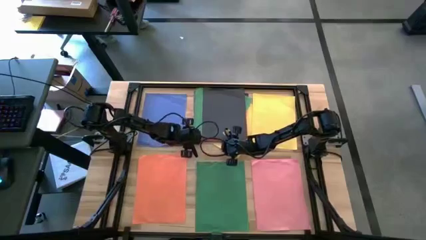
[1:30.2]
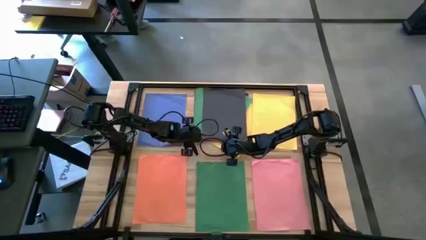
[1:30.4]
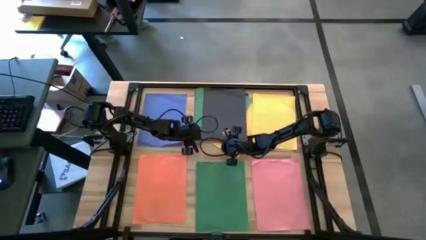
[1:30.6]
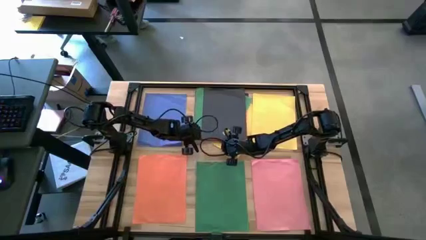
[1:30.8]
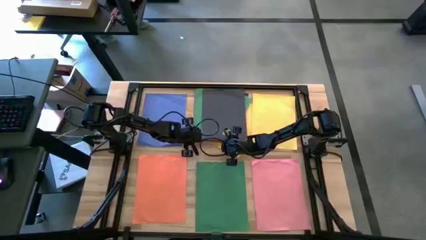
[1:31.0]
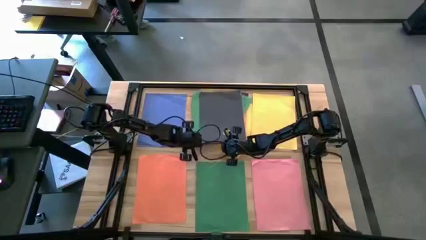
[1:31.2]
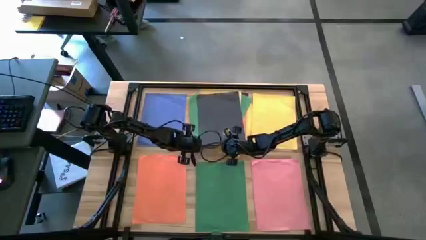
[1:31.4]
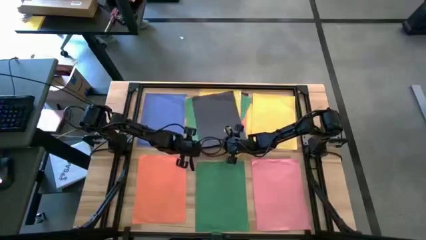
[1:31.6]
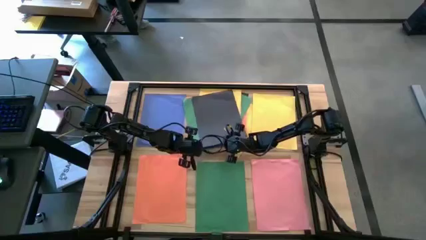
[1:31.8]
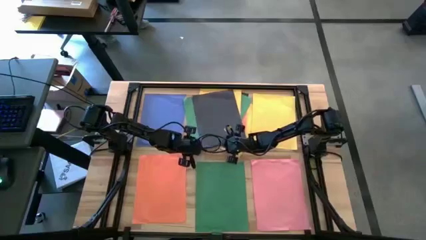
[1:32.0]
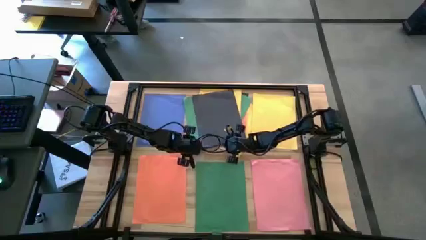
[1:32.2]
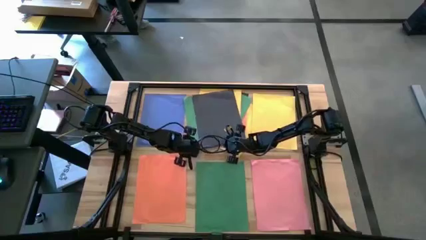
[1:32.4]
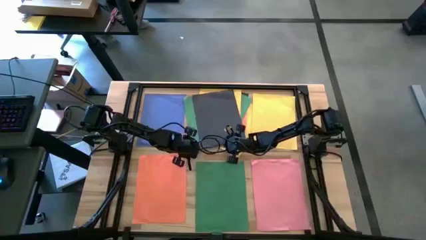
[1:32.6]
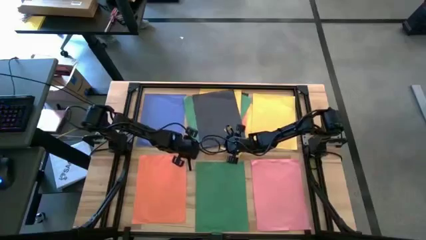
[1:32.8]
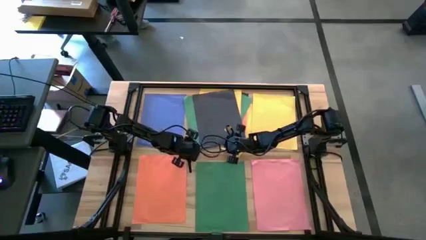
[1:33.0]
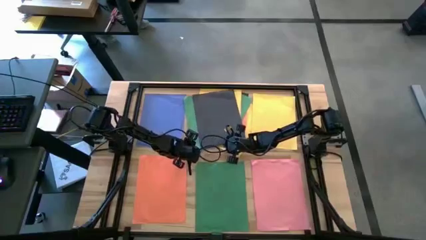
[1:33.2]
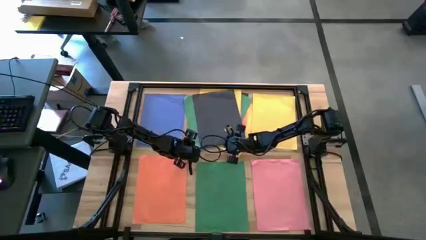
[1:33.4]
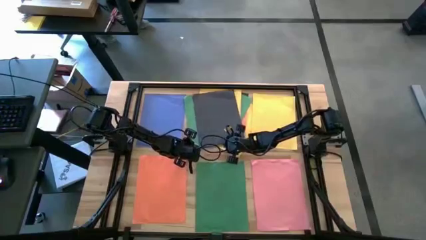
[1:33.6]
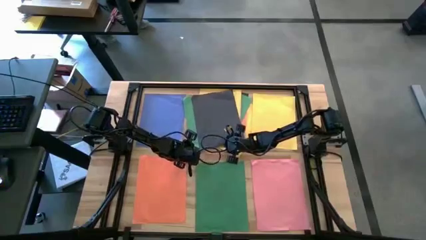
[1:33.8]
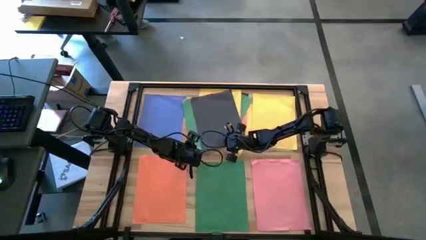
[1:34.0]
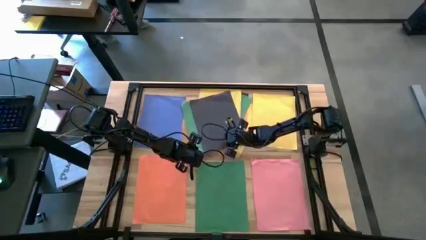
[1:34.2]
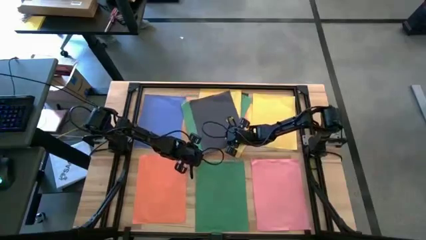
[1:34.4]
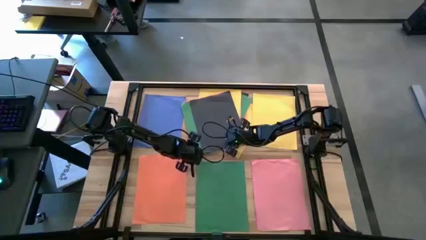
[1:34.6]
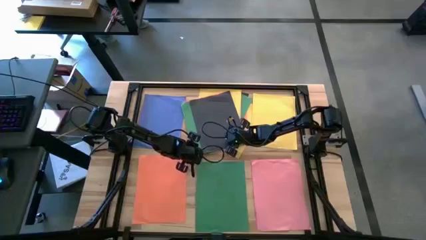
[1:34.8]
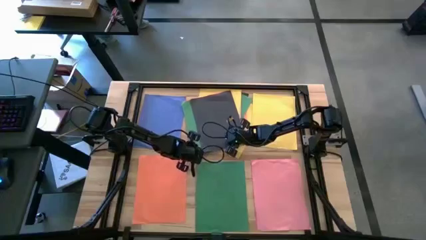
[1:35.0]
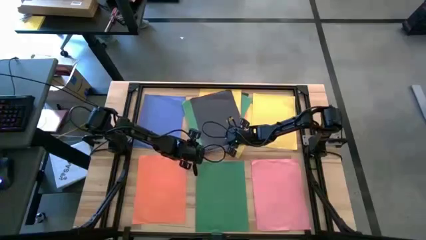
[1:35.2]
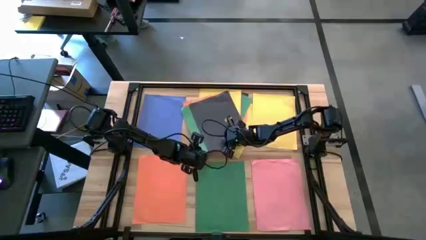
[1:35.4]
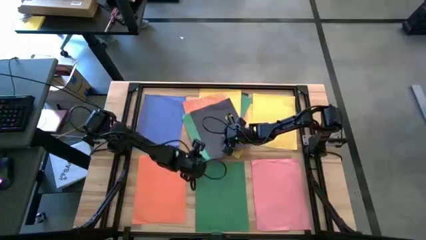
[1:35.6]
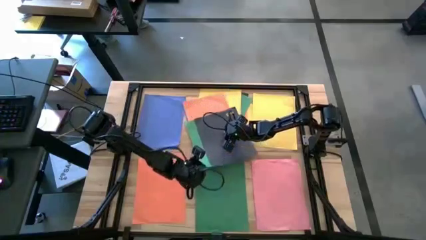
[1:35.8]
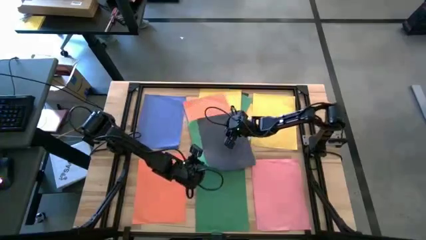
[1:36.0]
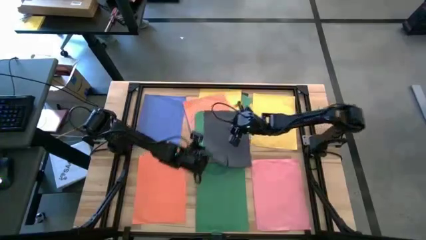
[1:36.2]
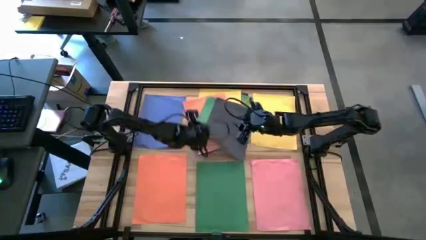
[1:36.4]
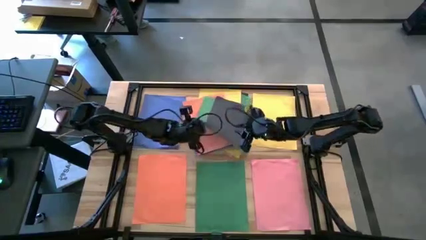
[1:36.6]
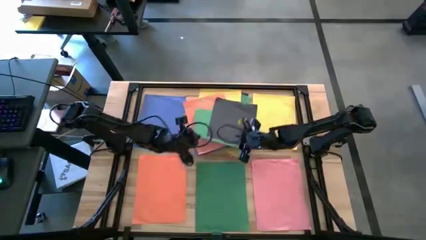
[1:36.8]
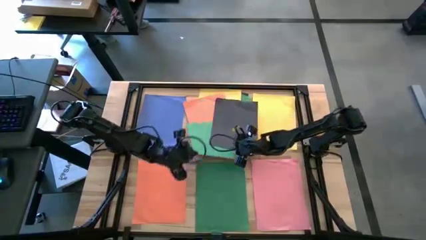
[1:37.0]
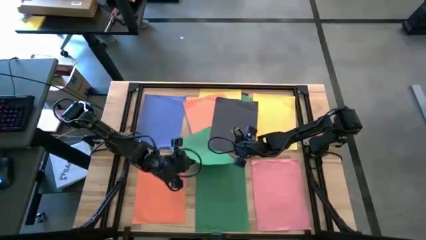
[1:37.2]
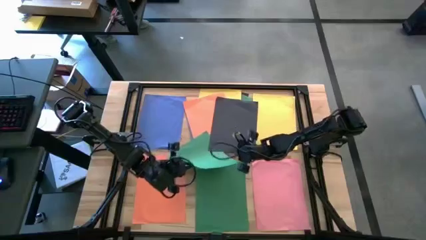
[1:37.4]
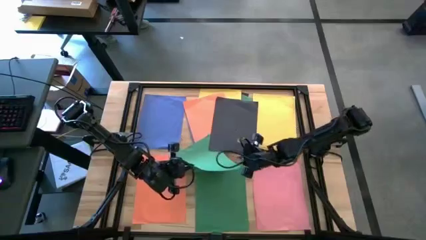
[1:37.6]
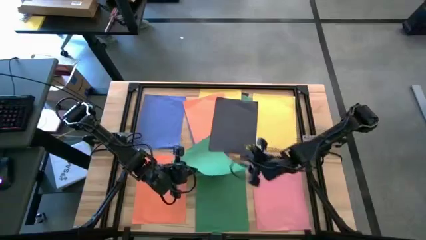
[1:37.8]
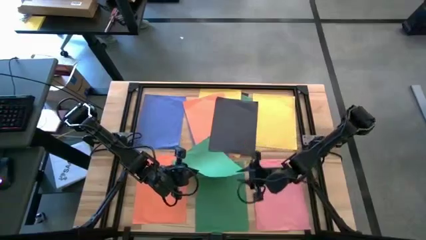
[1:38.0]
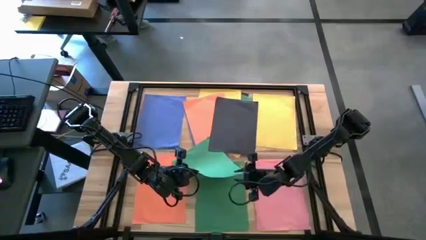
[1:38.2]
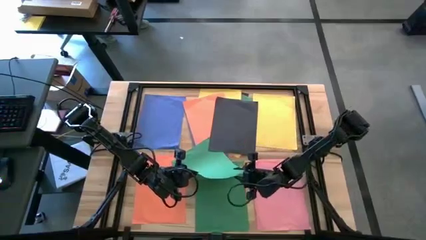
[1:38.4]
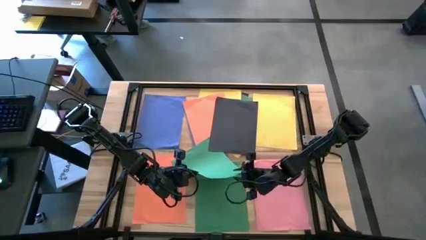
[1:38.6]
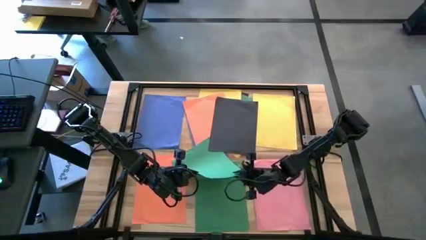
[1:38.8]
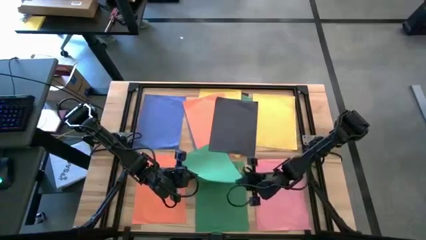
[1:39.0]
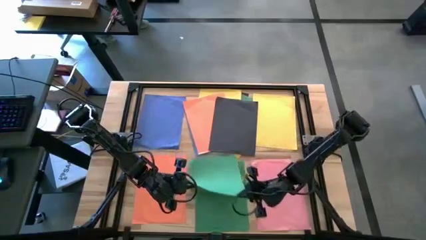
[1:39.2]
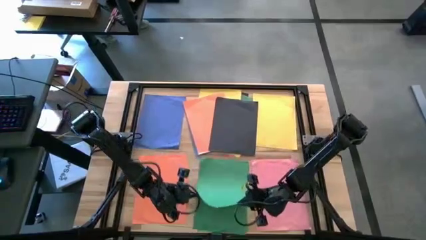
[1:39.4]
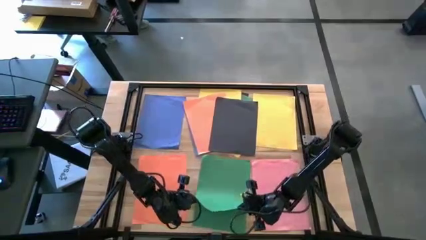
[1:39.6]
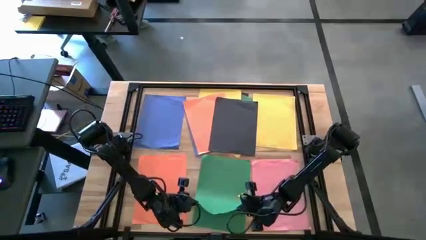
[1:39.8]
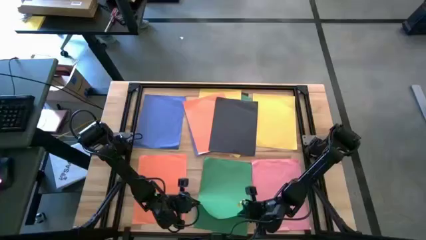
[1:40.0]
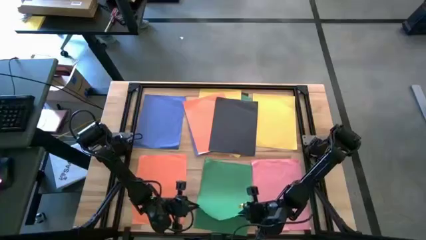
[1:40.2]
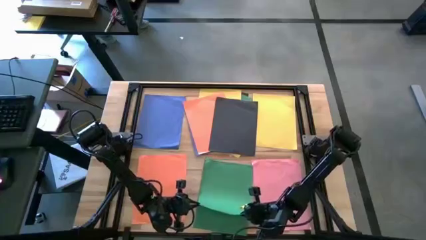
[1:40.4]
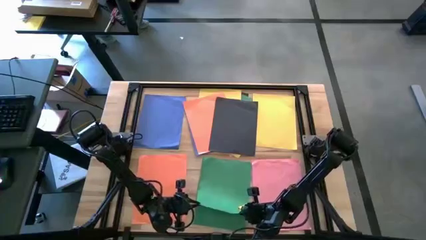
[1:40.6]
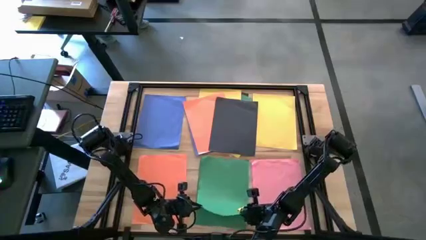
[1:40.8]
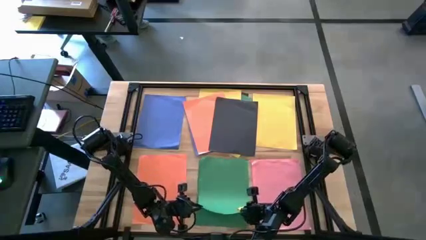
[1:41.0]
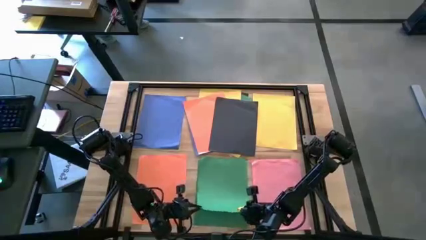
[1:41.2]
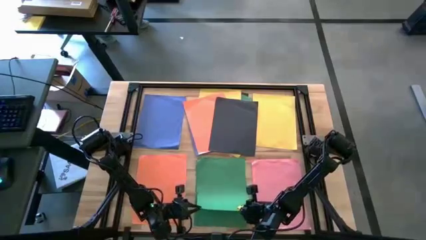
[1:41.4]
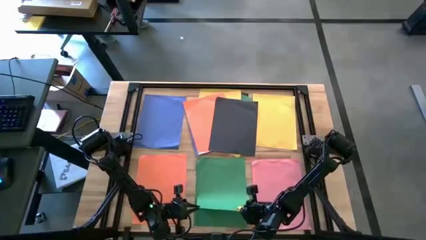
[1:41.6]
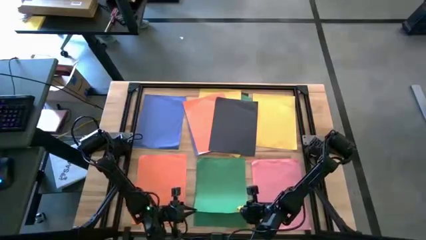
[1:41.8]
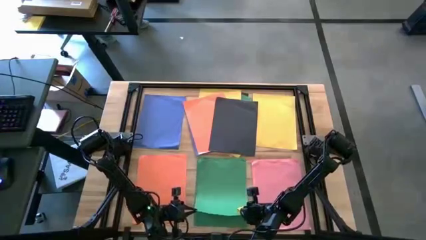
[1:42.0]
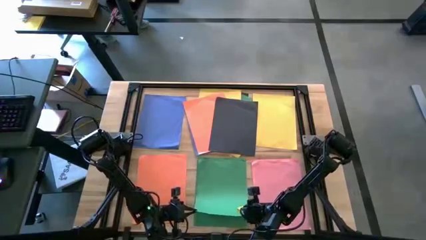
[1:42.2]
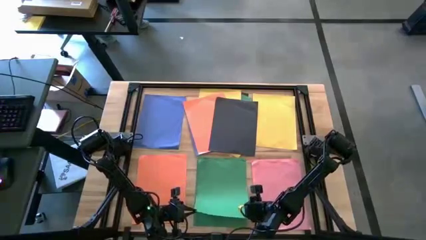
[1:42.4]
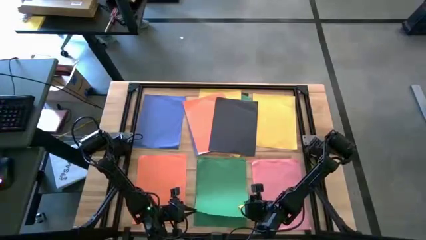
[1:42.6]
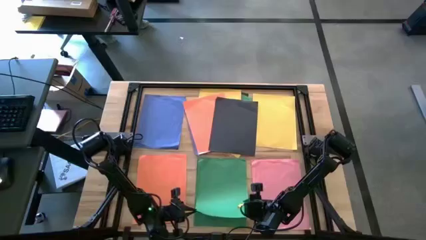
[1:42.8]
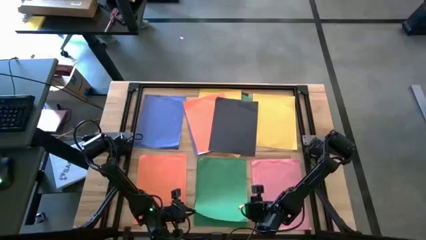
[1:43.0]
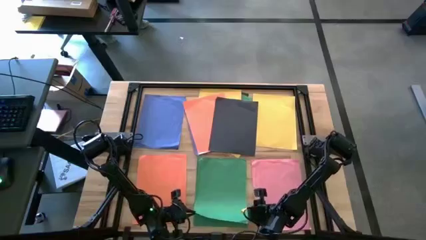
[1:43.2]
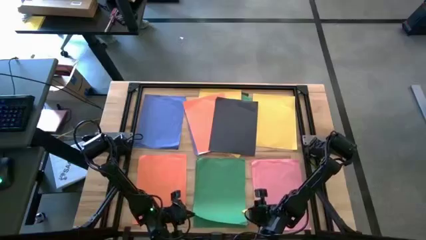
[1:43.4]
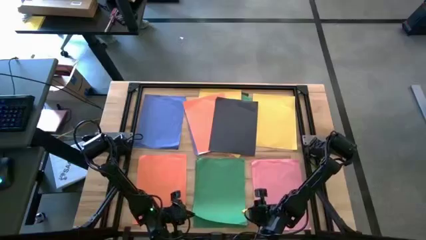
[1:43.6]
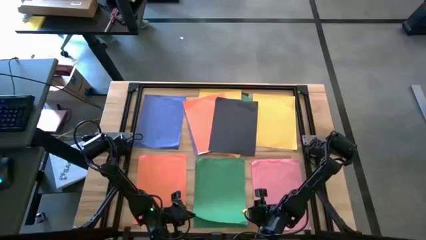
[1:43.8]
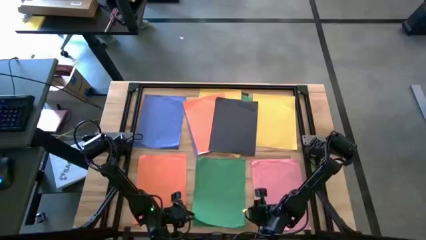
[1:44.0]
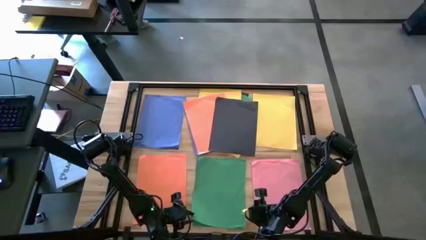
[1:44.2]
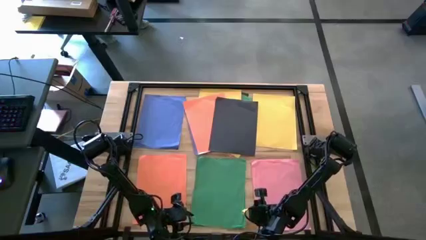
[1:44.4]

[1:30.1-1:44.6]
Task: Organize paper
Stack the green paper under the black paper on the bottom green paper
